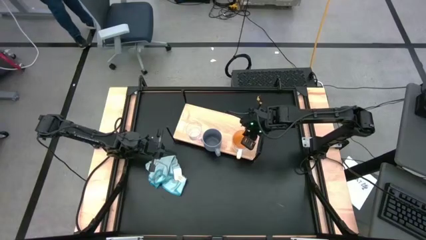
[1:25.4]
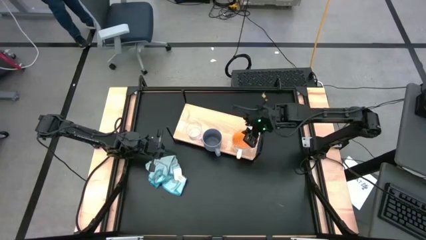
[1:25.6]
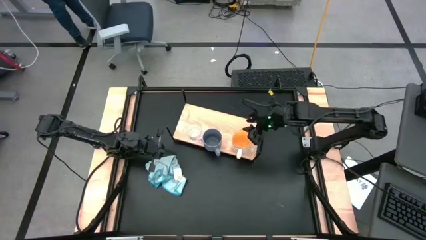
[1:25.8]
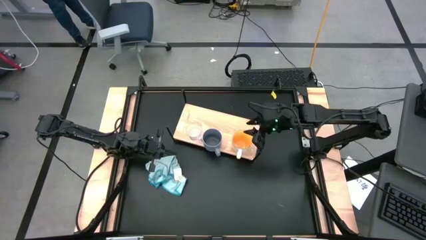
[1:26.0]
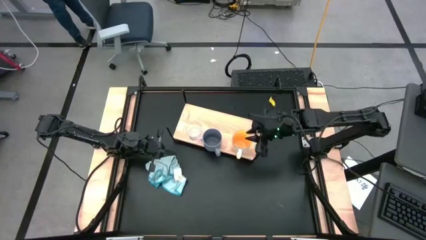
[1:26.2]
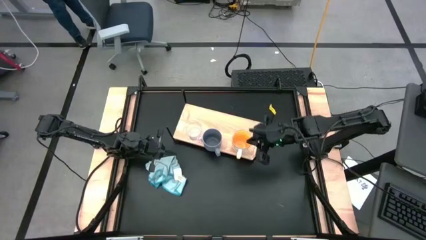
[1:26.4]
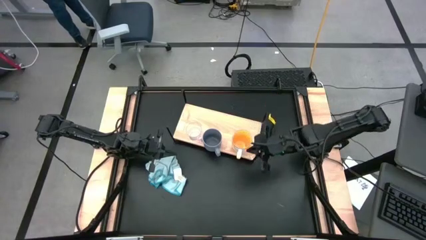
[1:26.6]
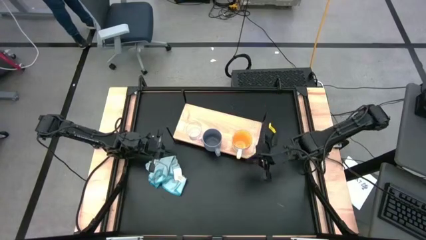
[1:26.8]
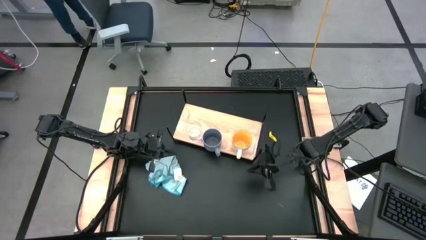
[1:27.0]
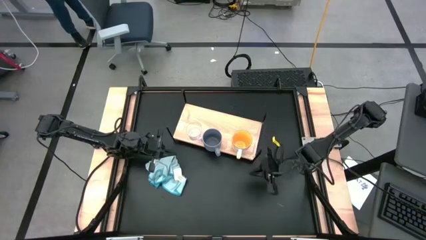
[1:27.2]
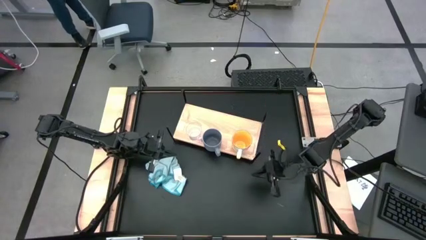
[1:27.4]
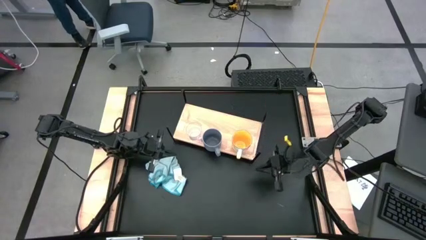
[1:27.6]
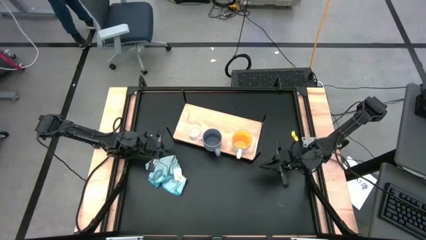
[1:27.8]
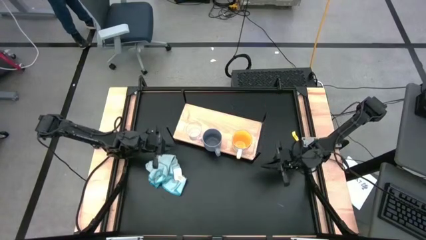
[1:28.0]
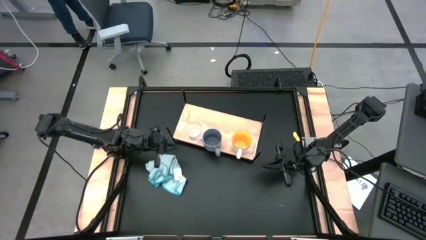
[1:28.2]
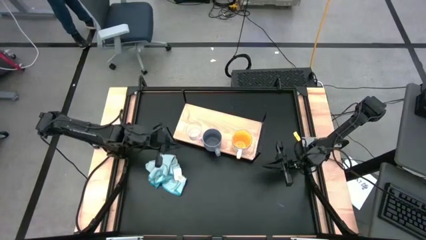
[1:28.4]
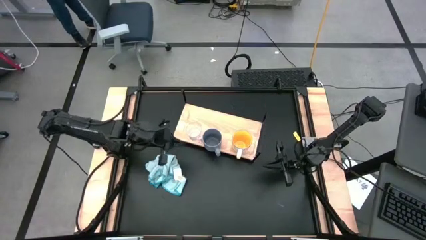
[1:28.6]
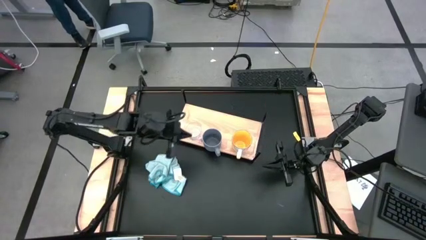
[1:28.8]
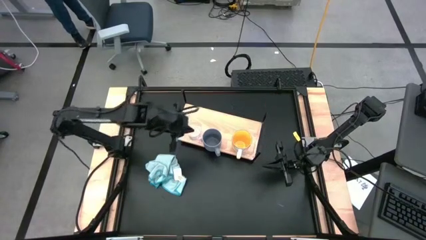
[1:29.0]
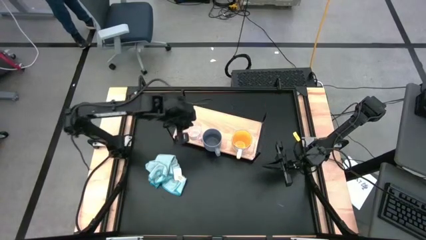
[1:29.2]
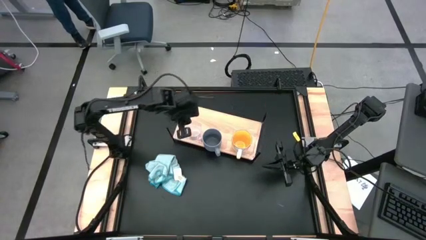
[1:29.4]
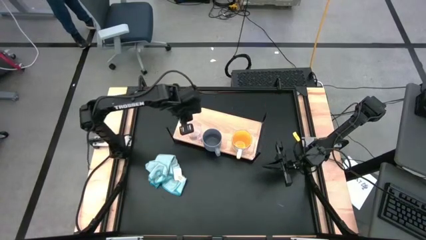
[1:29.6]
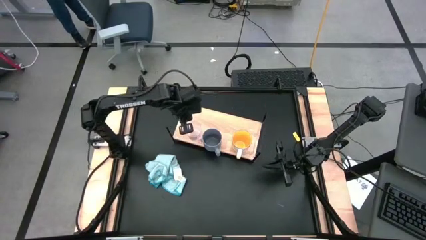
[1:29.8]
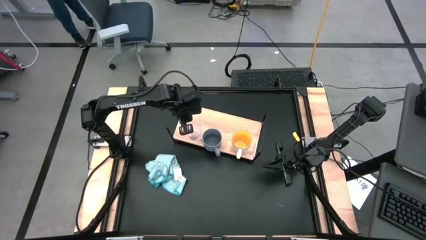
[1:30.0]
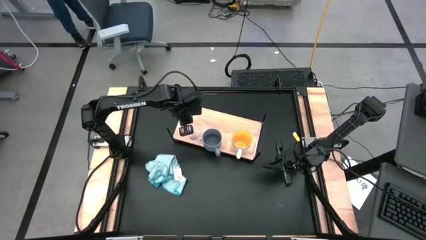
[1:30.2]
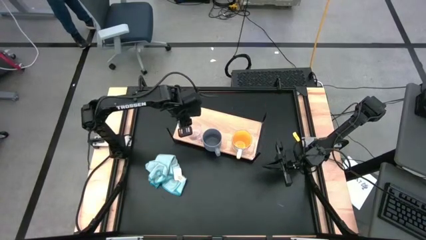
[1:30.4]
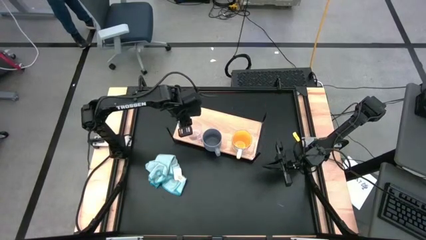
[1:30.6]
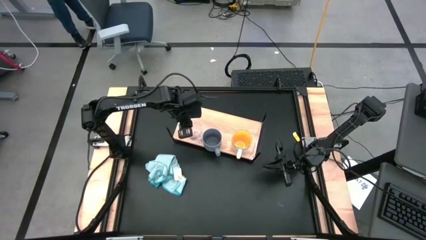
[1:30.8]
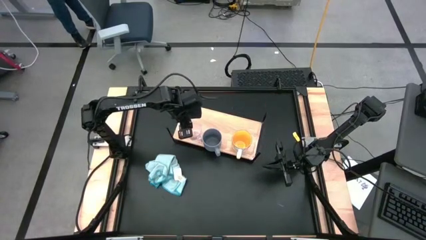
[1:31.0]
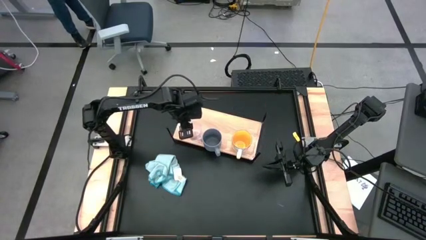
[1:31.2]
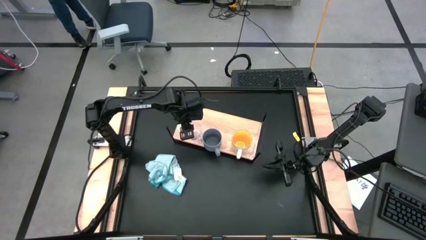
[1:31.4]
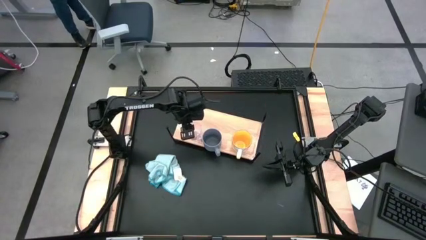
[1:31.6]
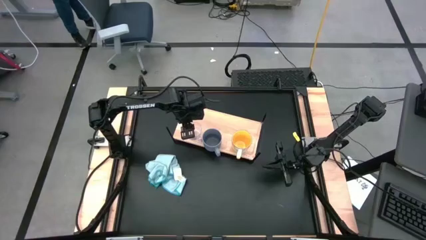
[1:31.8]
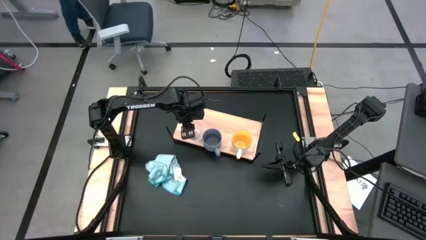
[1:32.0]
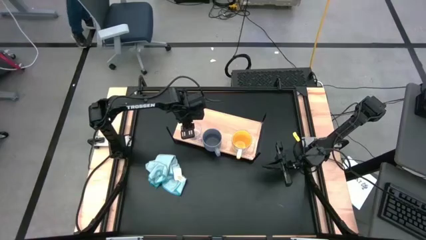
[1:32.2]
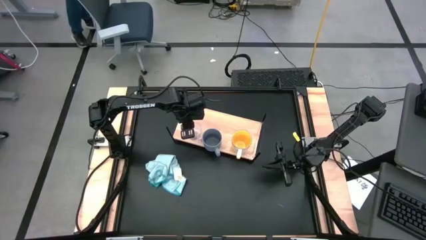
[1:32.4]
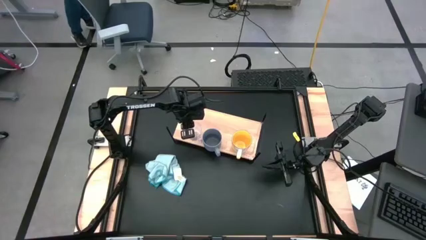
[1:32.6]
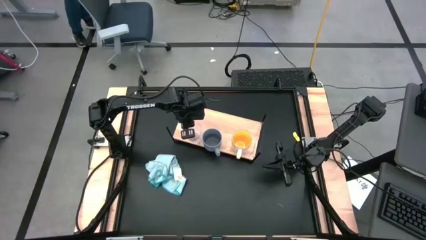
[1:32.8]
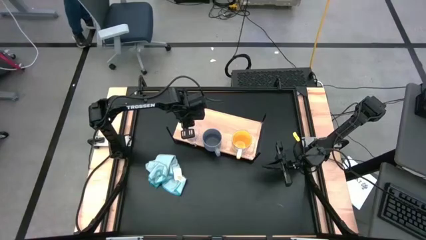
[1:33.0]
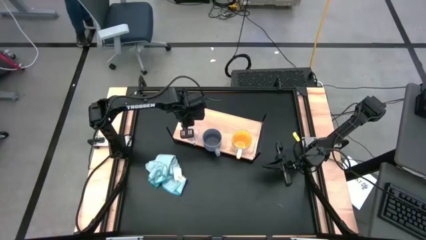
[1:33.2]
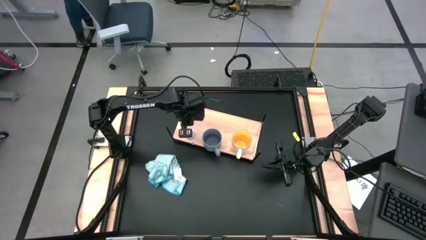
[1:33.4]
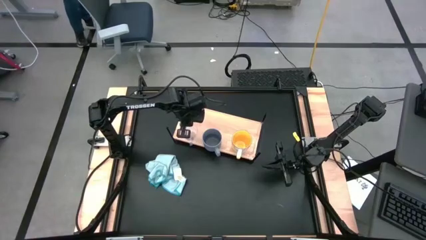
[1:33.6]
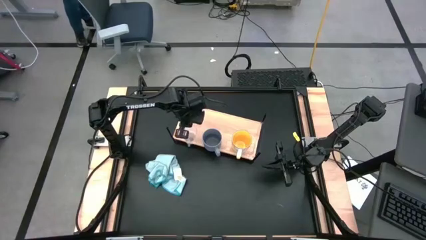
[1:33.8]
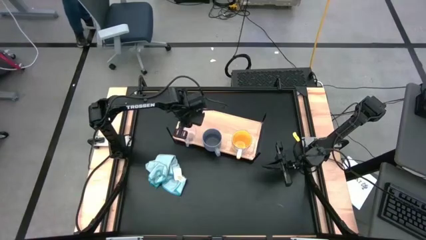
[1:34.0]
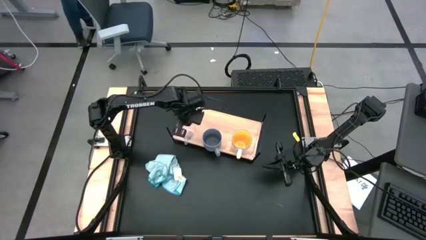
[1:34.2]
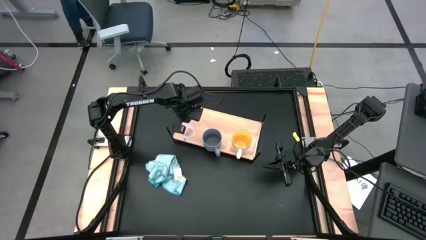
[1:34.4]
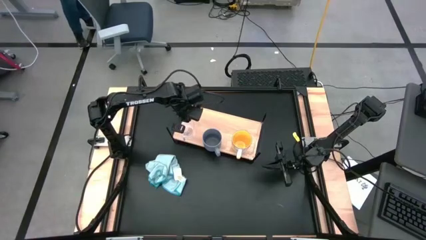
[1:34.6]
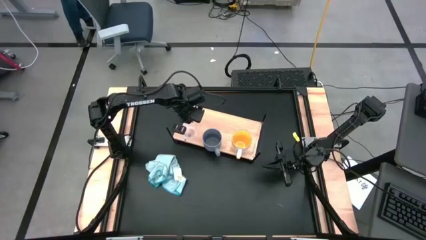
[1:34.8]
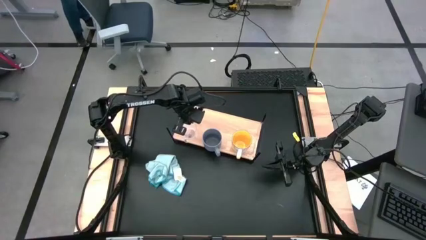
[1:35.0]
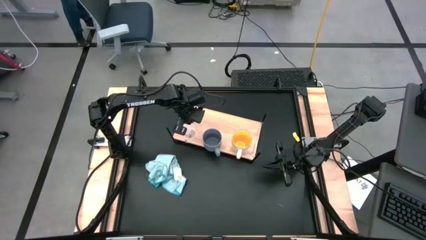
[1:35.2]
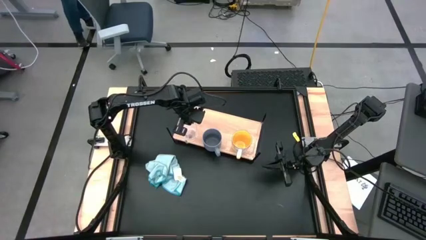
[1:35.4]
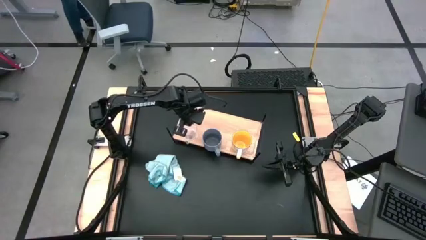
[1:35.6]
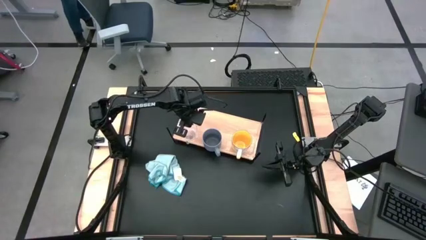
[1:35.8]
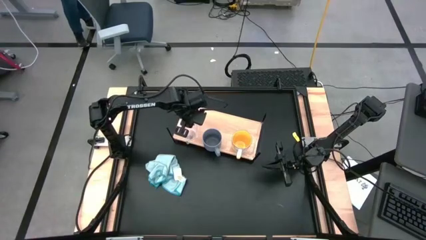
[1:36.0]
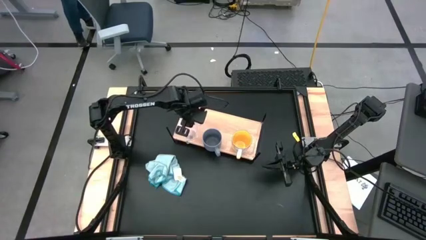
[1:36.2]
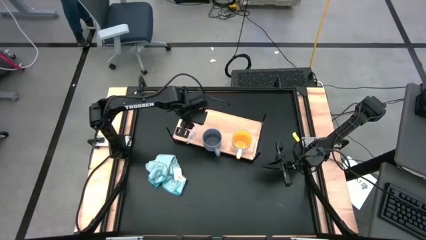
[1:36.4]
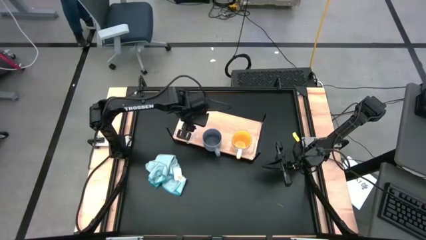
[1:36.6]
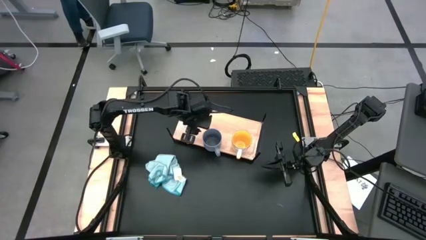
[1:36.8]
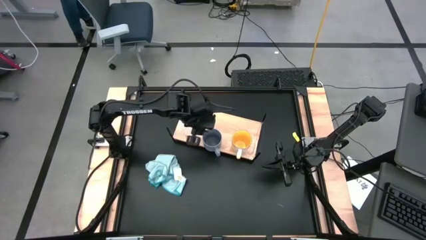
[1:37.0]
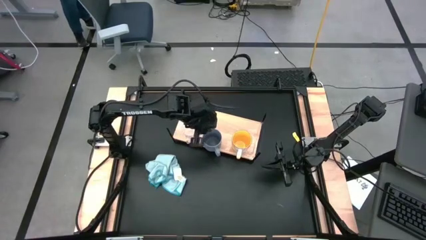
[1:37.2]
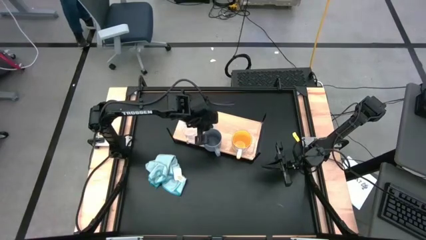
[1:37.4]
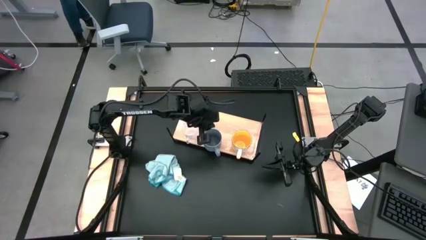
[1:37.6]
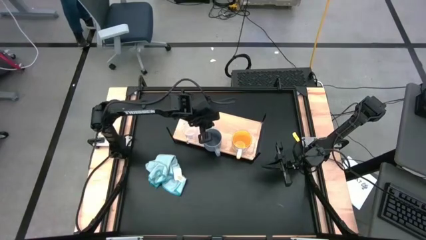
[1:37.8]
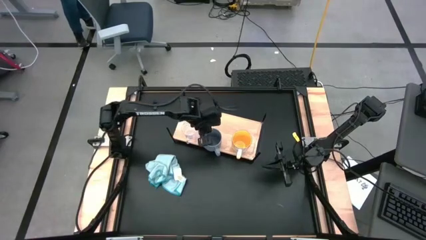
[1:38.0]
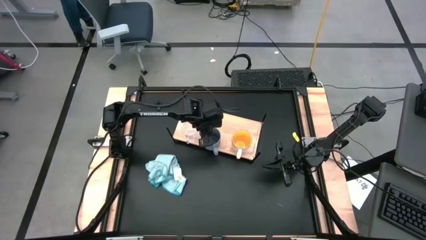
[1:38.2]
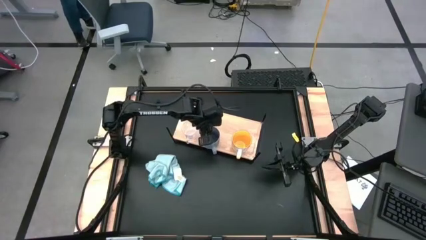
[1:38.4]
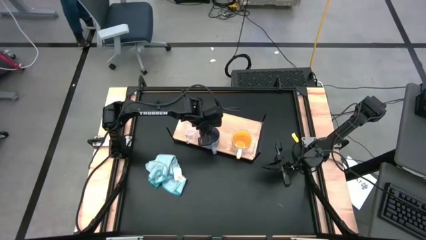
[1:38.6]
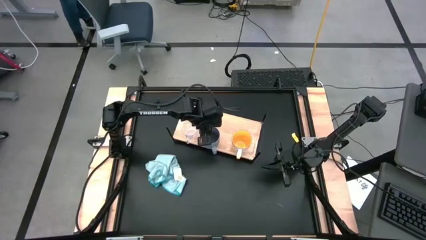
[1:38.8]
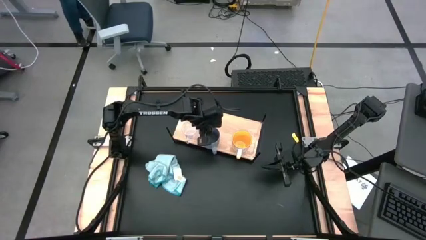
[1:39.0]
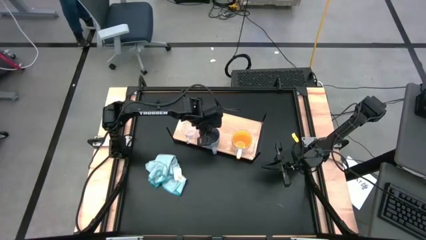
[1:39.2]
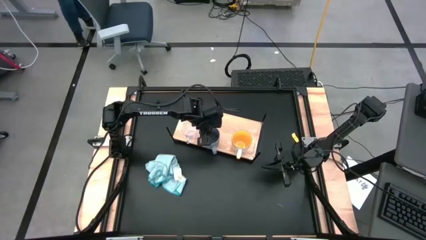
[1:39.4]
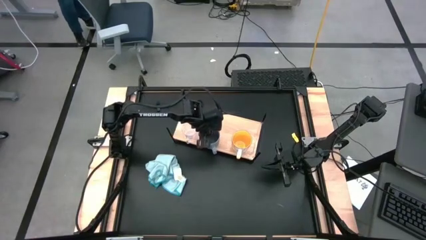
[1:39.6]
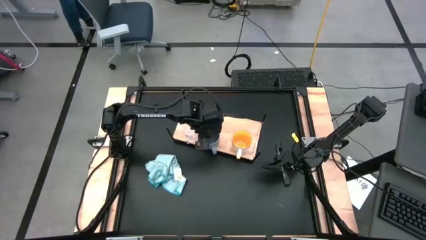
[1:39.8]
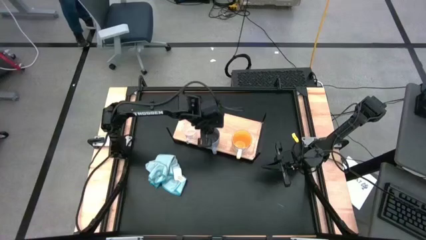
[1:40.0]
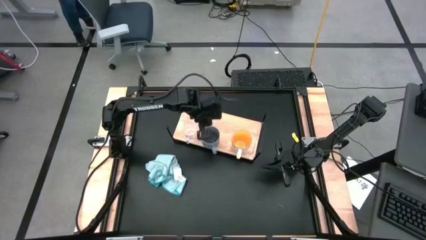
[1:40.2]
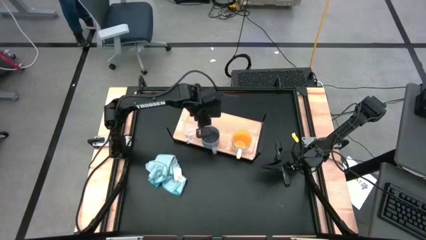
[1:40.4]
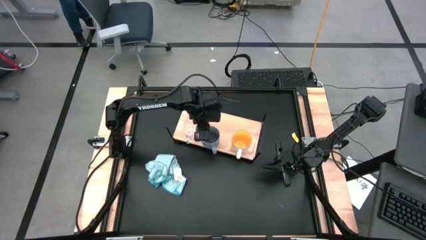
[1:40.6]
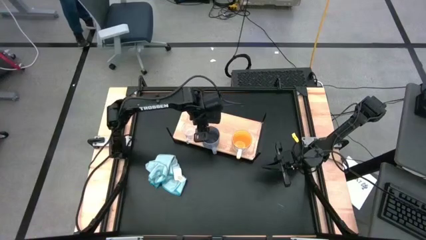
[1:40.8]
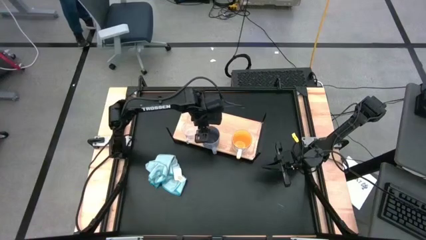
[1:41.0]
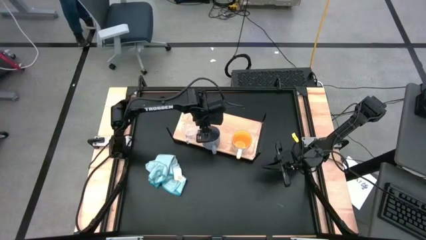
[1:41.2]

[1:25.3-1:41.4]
Task: Stack small to large cups/mugs on shelf
Adjust the mugs on the shelf

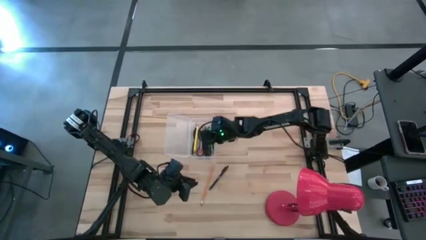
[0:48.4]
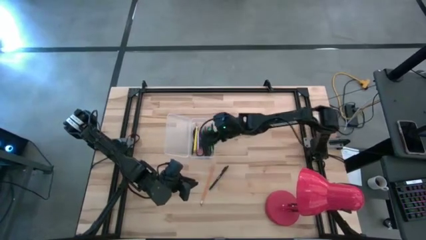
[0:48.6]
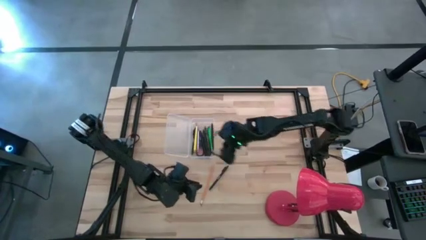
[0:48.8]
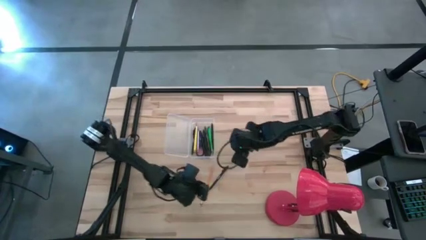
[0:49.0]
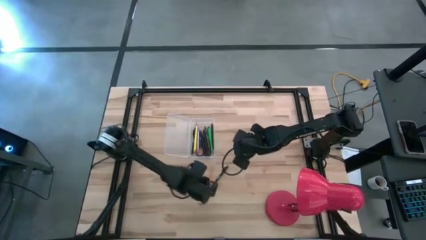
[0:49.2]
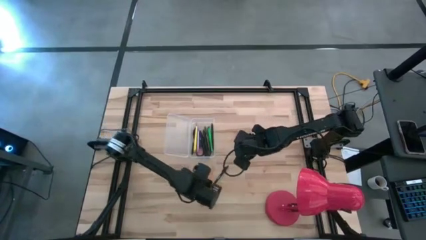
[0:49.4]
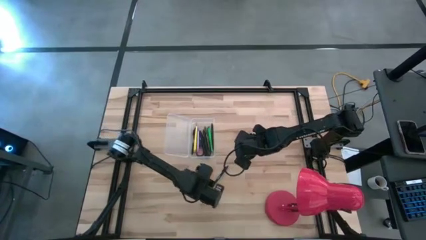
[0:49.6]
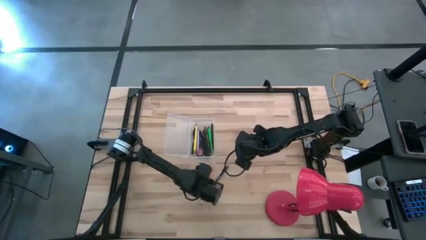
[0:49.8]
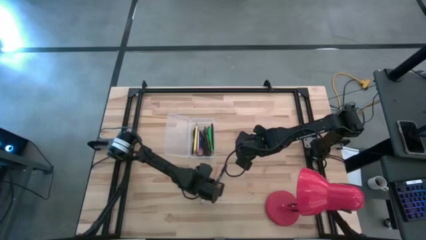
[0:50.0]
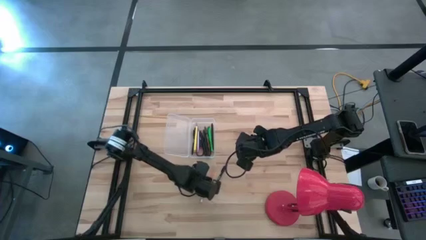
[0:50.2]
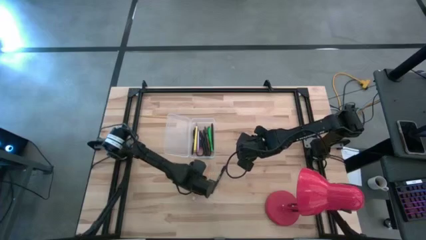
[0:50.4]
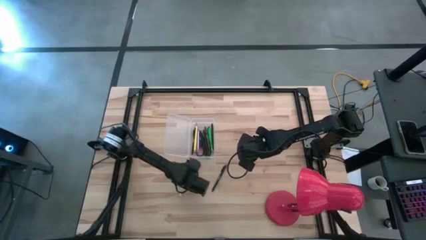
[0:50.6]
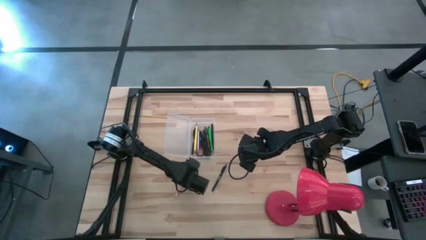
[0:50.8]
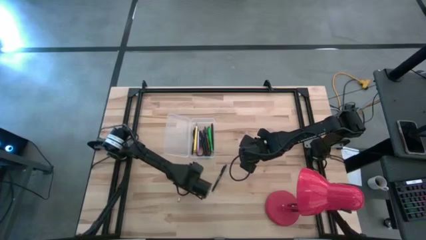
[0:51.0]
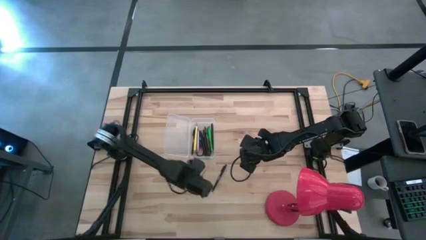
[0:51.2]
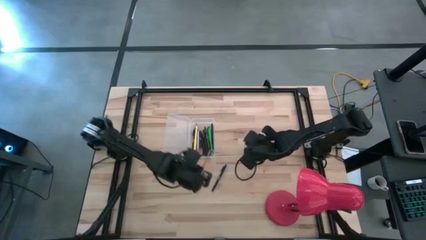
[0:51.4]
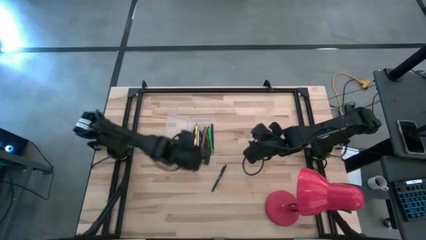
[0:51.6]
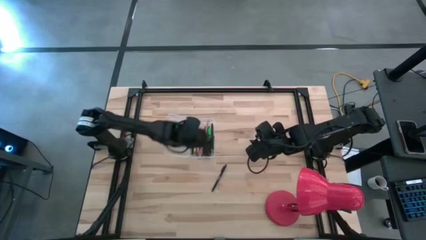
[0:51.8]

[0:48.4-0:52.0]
Task: Pick & place school supplies into a supply box
Put the orange pencil into the transparent supply box
